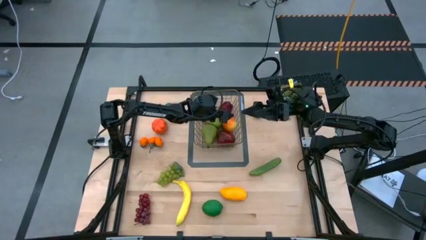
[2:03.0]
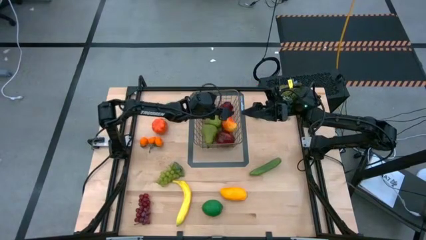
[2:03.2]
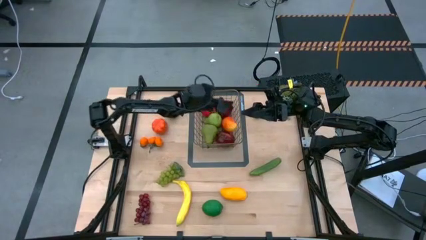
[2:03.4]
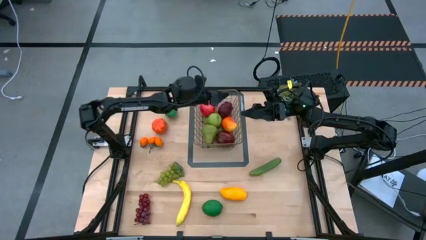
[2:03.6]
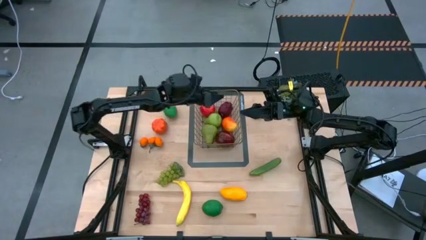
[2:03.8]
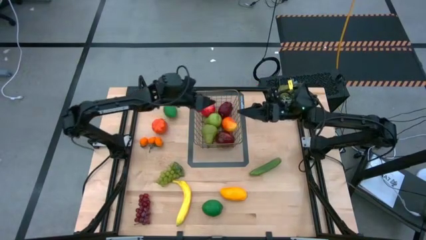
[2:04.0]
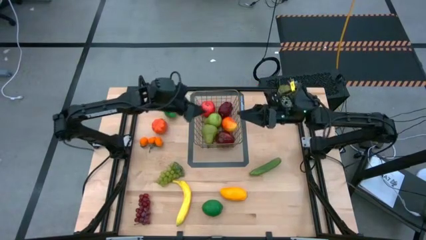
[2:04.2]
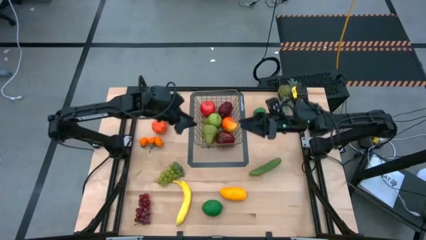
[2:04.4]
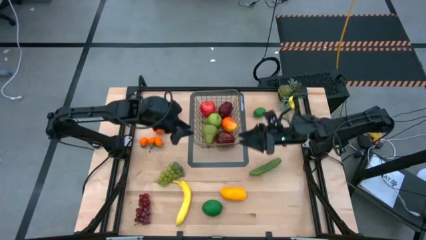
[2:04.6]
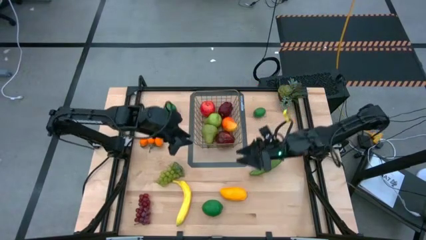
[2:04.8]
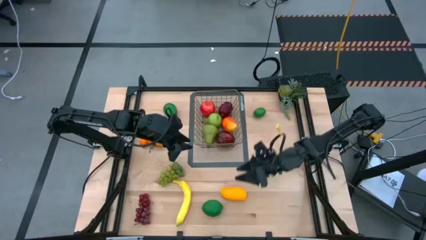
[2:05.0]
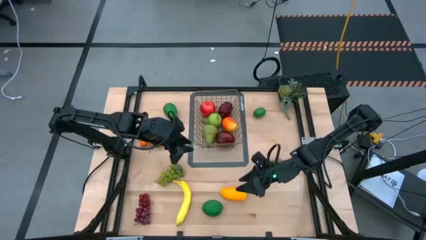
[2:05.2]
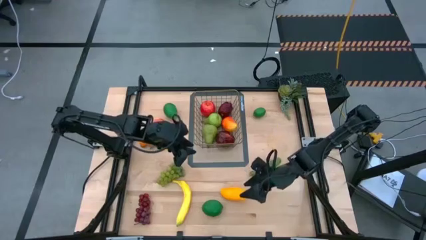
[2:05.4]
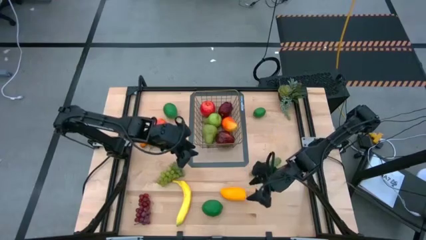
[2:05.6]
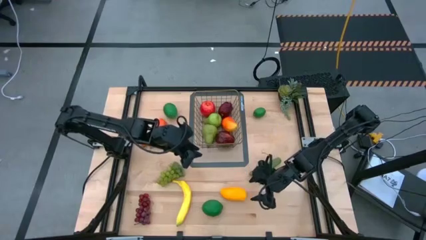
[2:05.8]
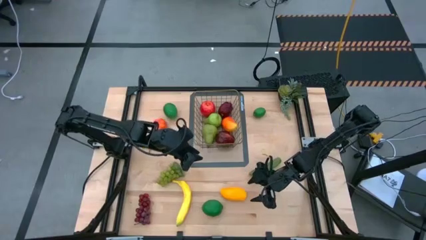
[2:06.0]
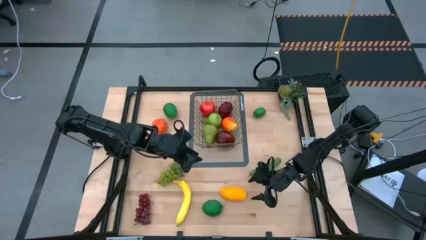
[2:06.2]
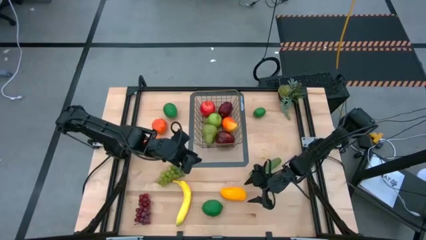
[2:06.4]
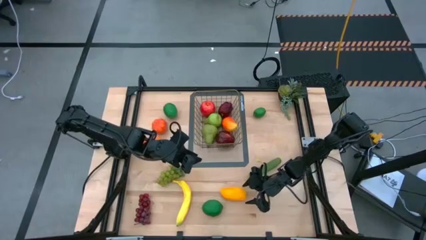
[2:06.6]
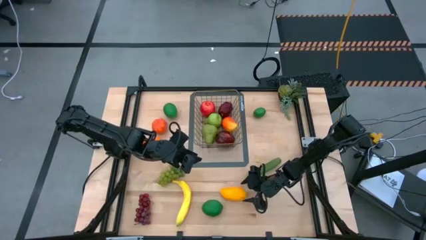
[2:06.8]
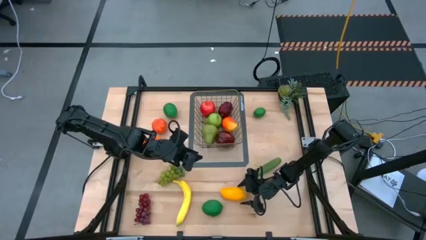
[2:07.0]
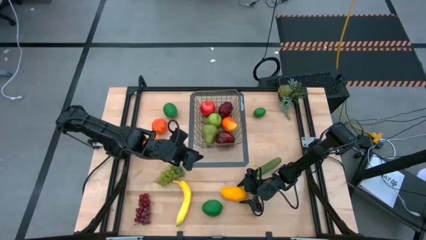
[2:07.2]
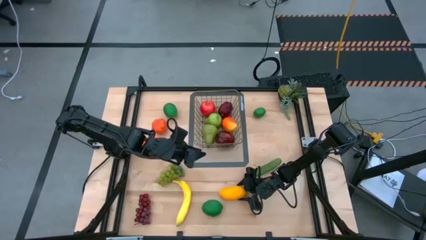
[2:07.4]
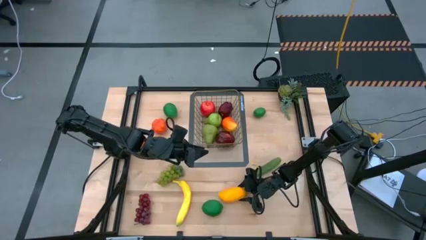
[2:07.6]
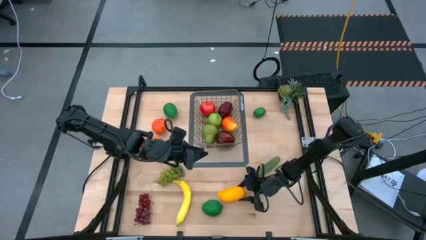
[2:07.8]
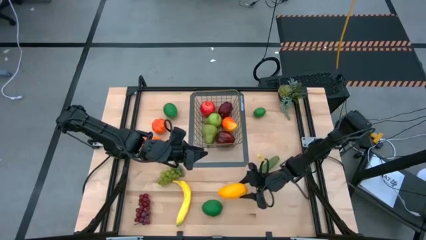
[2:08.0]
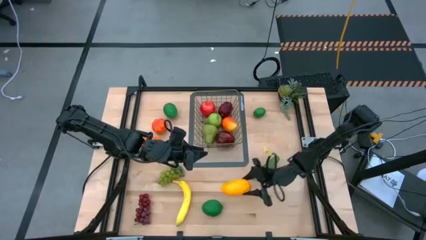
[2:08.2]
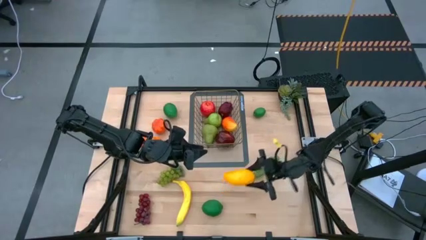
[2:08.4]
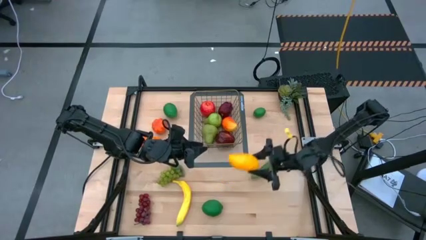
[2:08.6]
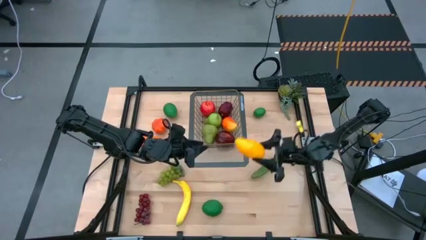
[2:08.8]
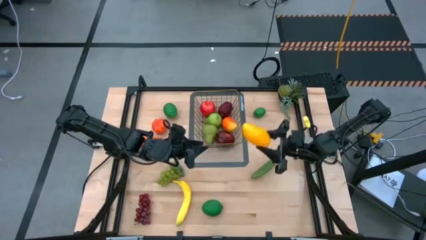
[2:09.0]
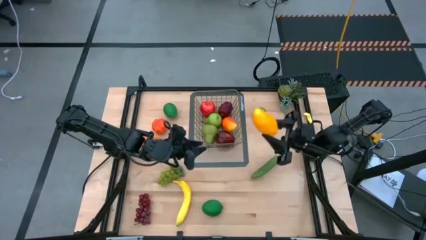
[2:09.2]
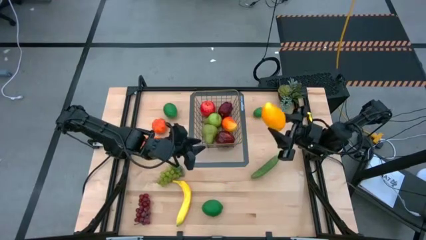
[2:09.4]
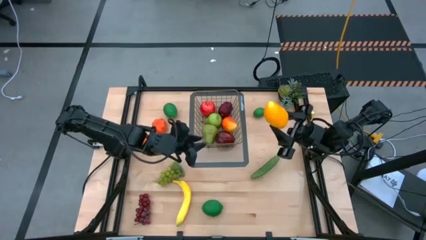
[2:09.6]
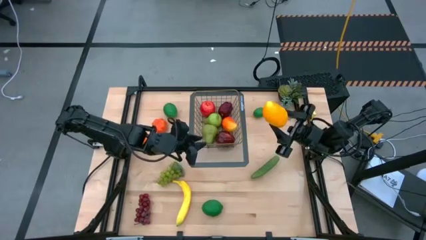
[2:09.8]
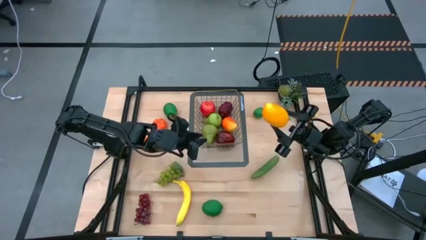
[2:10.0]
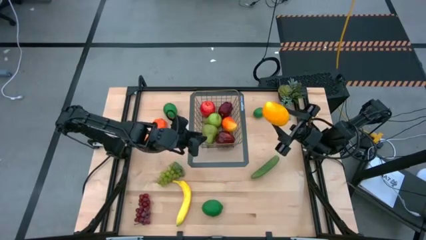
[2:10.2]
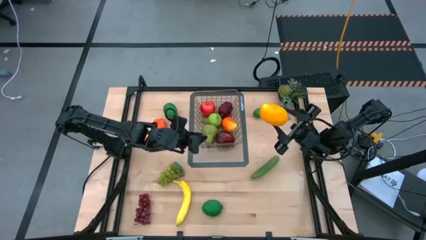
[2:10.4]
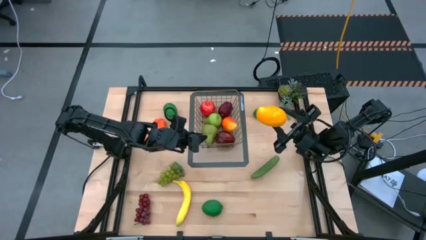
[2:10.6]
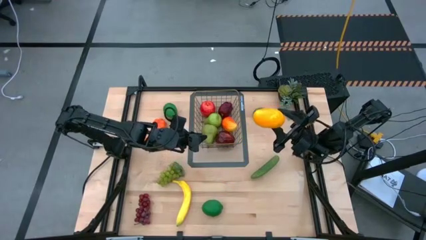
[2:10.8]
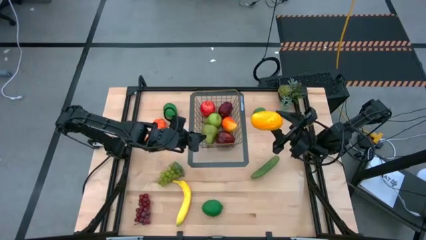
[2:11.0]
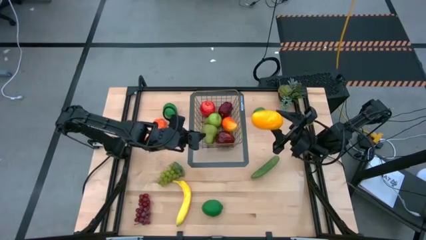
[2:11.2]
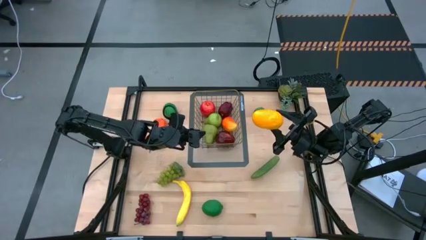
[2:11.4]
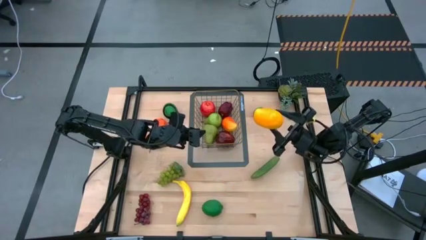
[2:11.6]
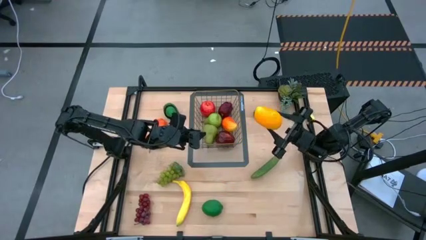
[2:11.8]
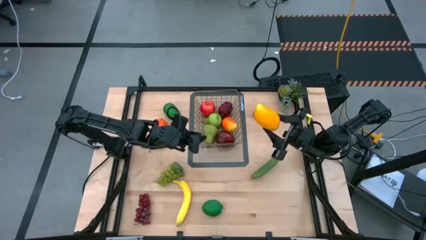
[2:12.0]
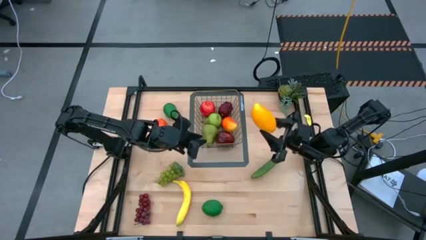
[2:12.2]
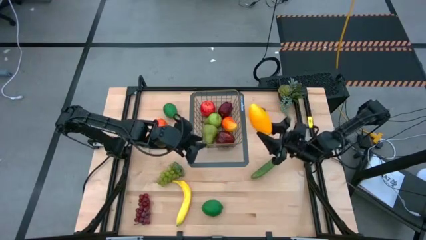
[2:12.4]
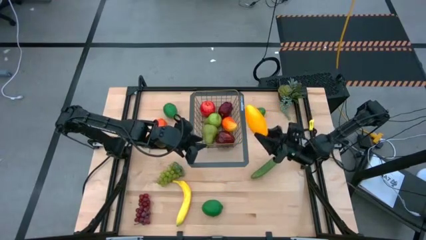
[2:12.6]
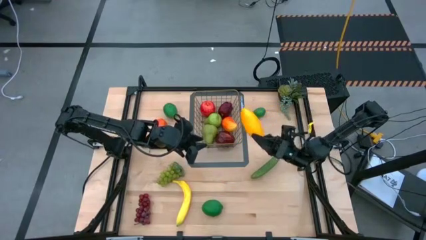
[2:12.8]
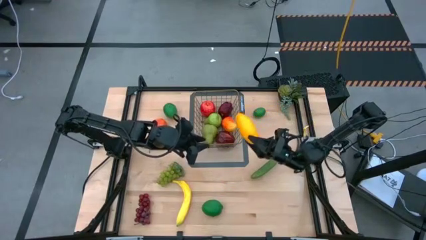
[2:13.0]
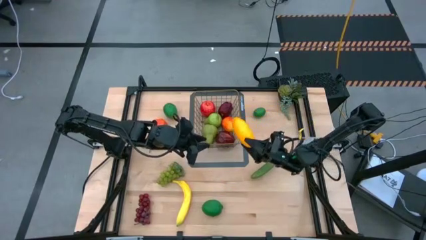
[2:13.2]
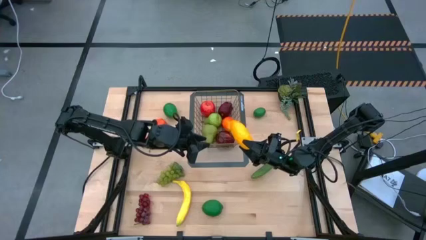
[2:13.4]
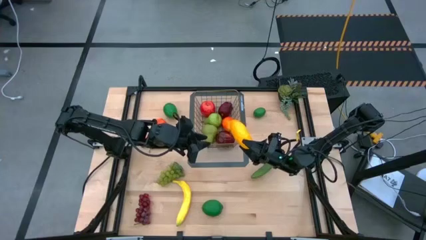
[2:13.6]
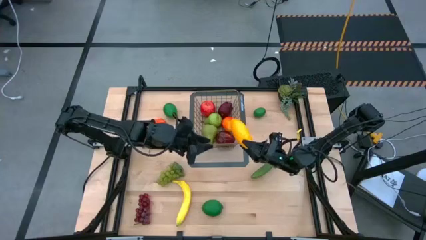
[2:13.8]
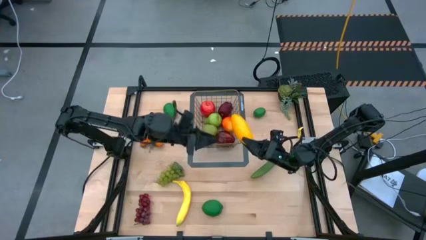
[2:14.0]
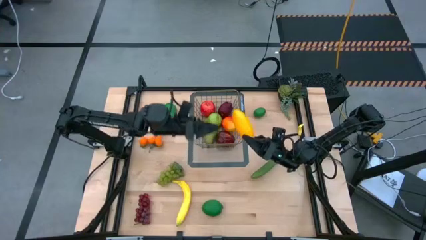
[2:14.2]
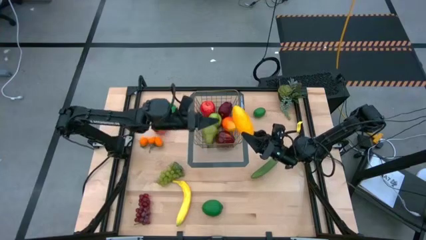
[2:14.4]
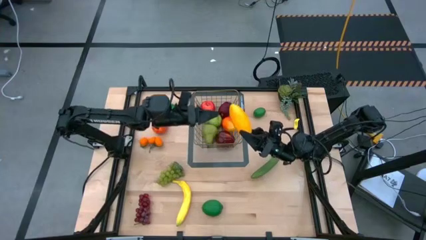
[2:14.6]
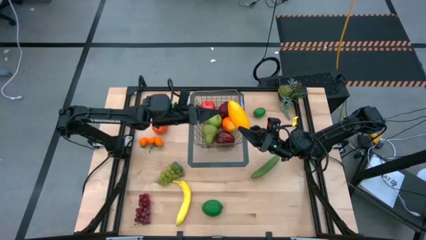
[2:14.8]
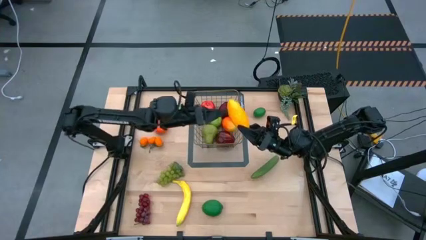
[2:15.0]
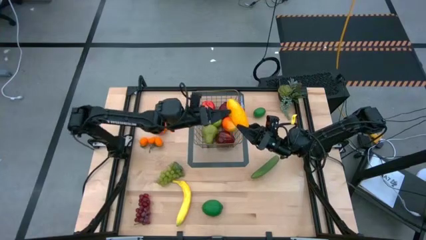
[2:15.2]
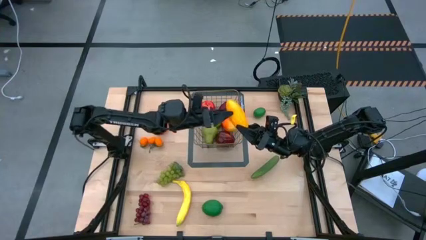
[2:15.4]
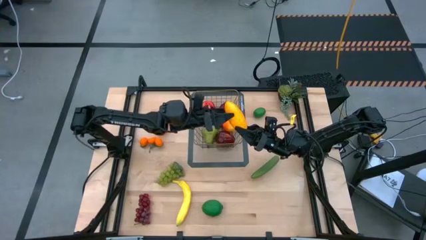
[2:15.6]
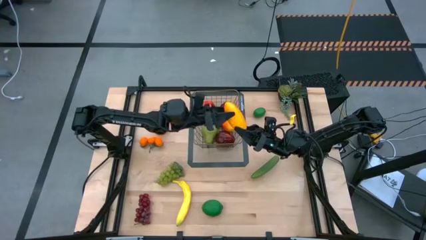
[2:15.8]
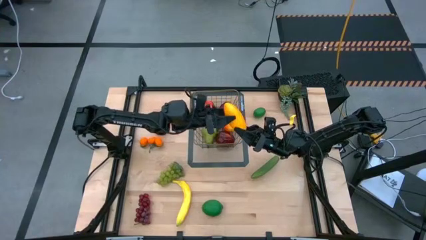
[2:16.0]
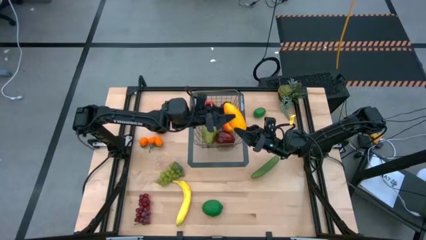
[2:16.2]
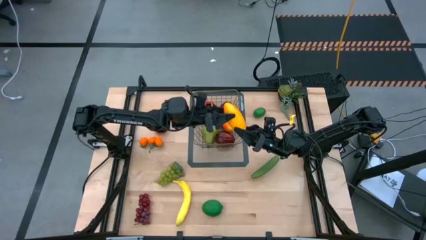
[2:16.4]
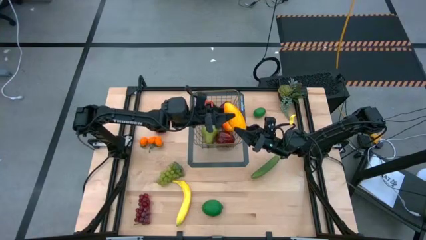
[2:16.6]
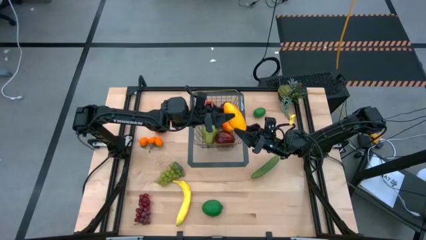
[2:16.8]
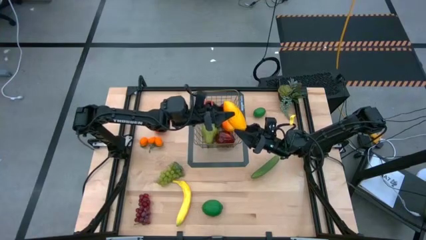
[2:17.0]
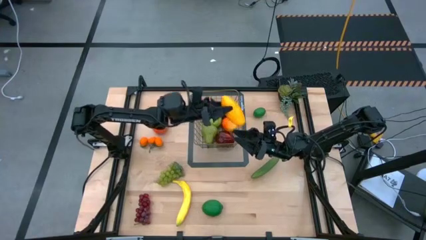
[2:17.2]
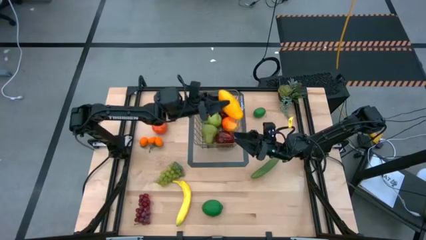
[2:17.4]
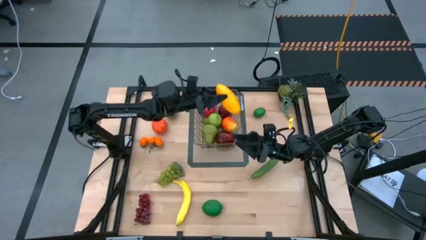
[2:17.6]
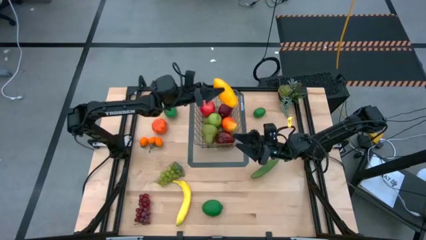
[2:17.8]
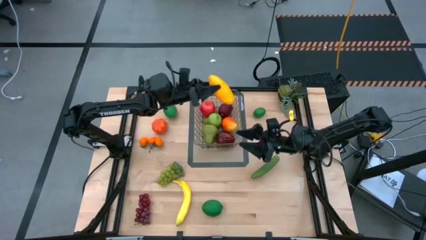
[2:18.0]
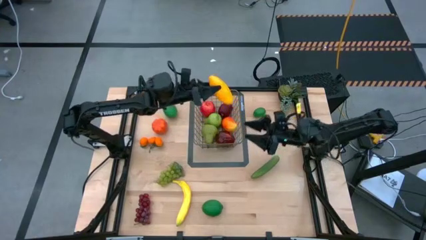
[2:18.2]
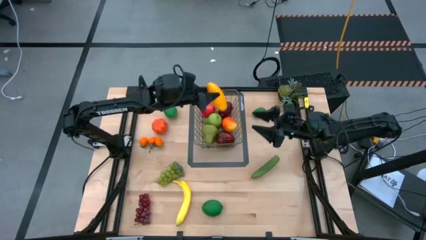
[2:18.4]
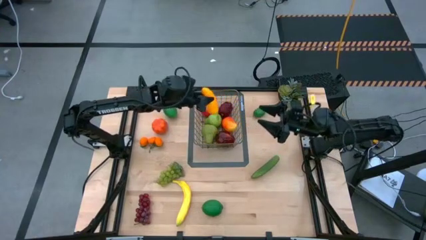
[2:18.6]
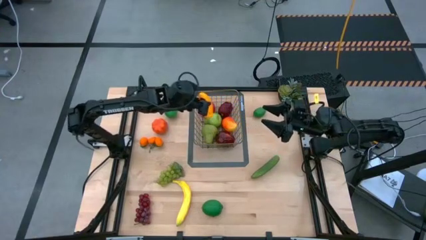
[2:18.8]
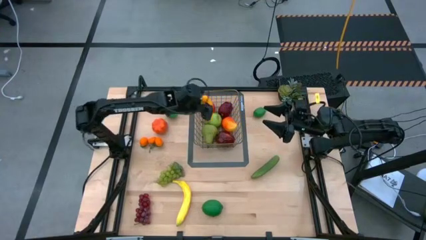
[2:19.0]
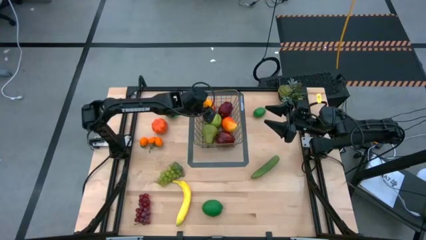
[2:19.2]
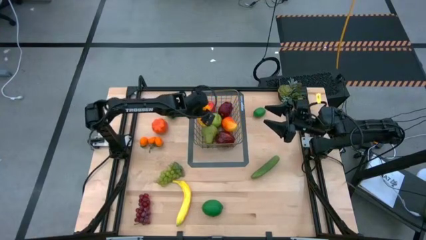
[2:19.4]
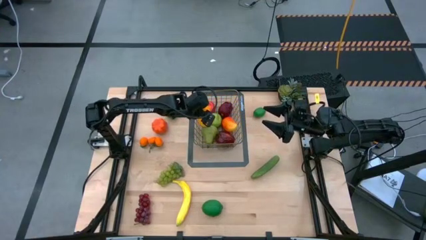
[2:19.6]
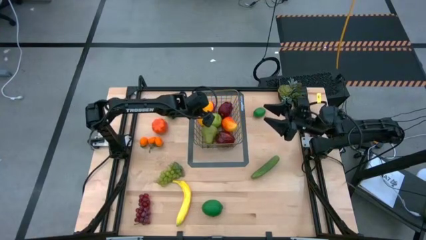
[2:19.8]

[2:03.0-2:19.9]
Task: Build produce basket
Put the yellow mango into the gold wire basket
